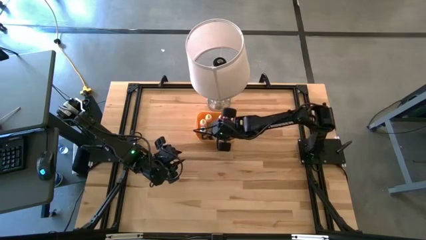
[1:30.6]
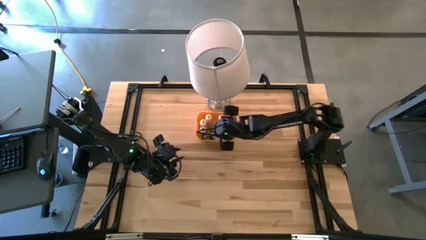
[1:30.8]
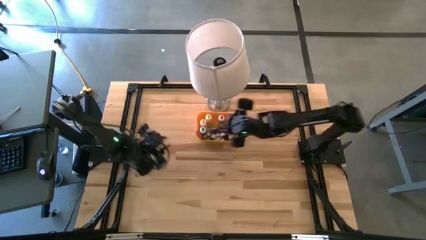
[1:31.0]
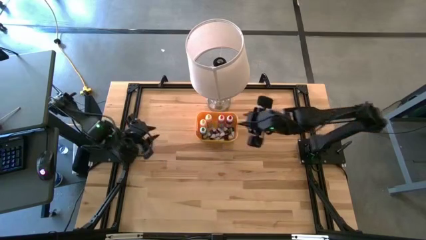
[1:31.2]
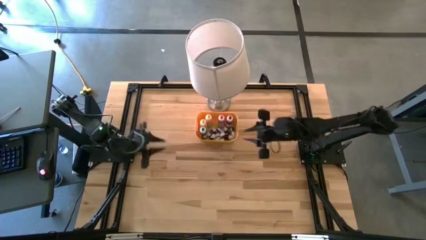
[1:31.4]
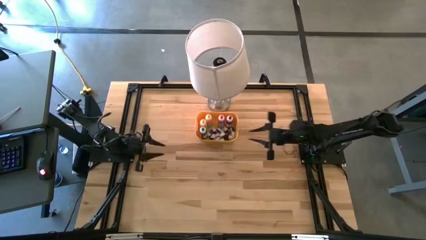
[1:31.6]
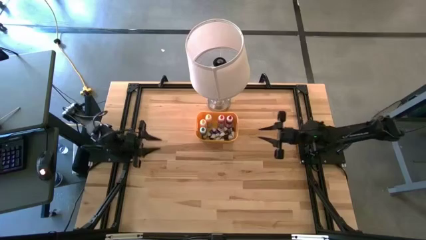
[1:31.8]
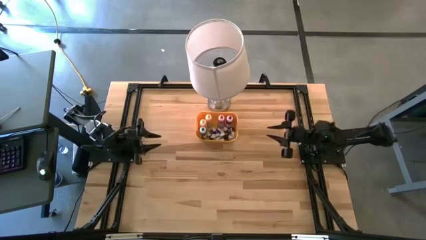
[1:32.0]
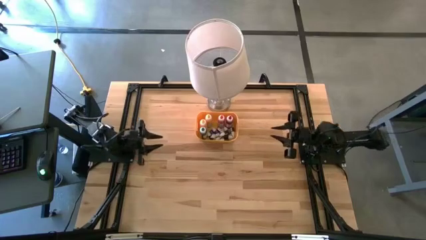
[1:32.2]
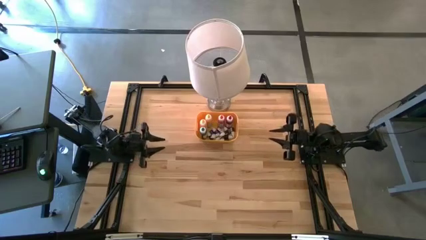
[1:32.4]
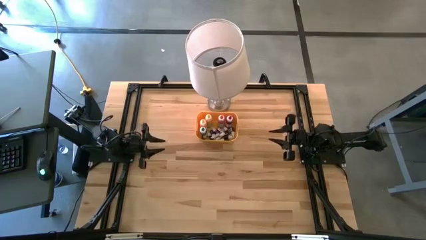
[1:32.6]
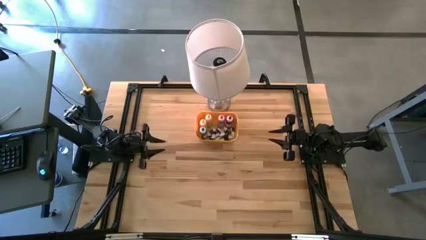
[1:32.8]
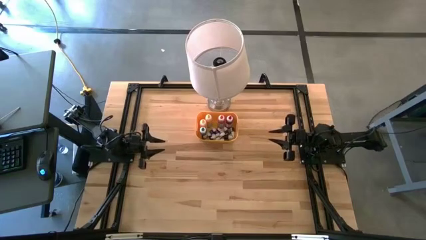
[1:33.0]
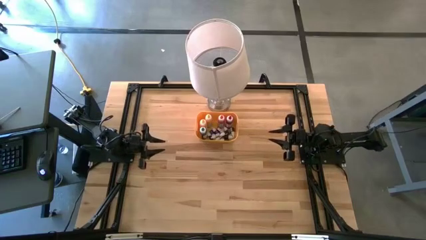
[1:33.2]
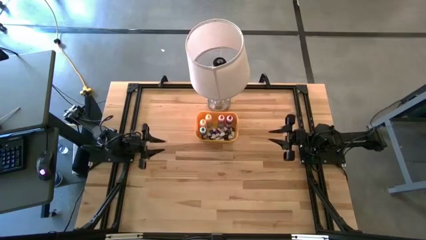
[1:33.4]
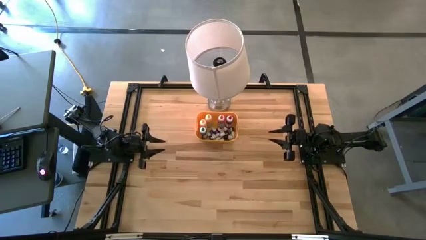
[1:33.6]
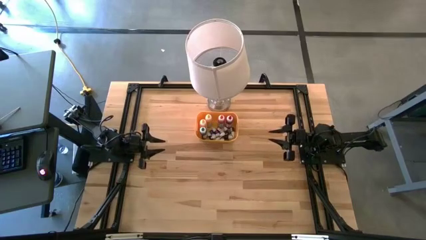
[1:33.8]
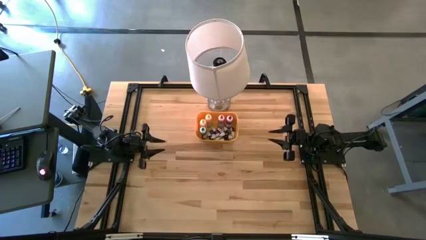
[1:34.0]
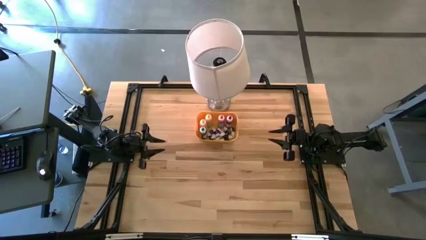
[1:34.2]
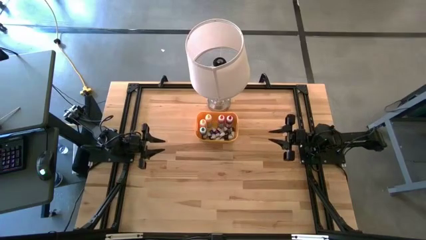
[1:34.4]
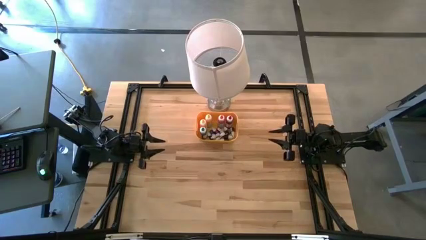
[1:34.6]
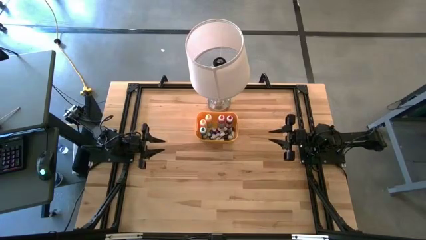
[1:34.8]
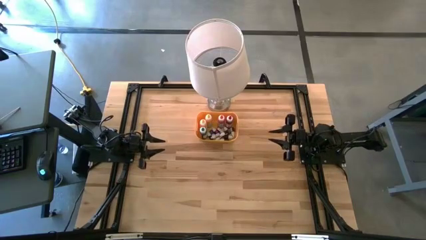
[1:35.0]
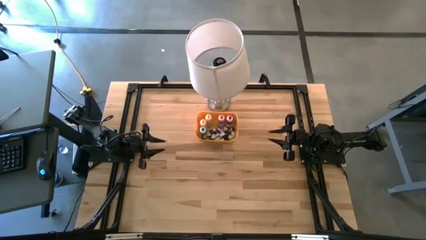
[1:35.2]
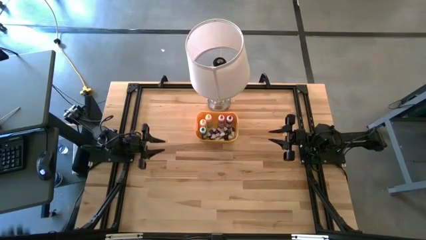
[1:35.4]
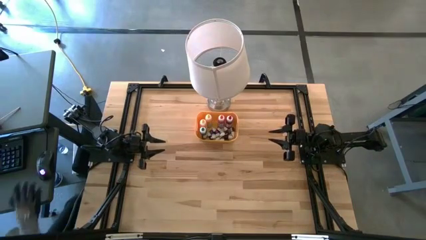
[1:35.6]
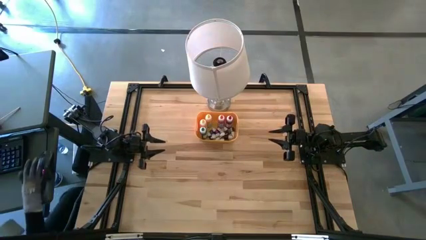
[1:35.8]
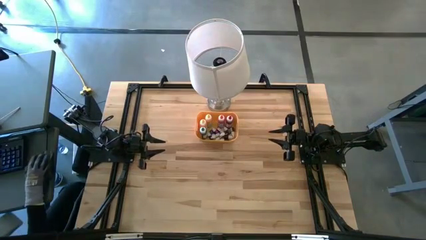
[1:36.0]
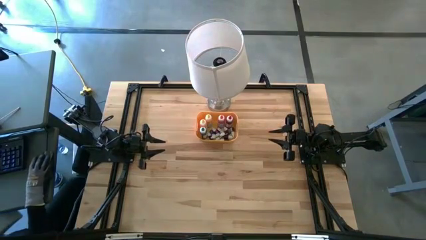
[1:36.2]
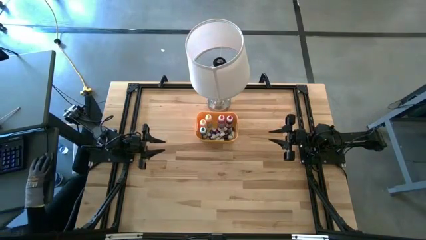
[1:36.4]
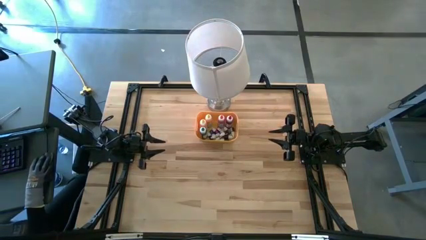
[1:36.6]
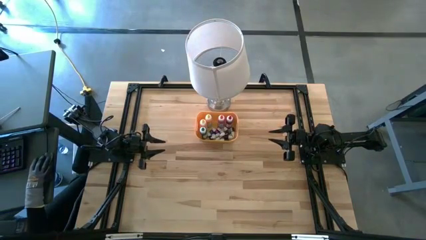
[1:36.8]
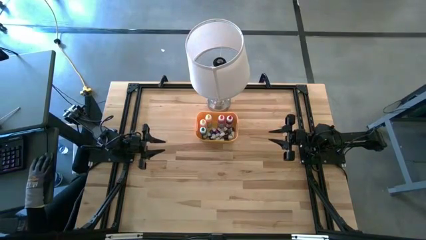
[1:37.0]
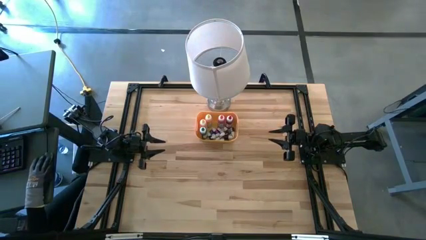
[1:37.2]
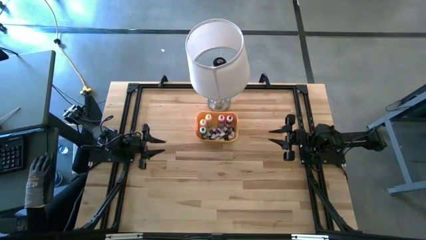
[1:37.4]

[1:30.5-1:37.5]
Task: Pick & Place food coloring
Return to Home Position

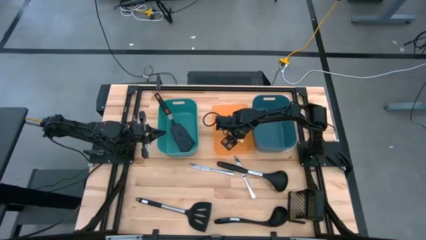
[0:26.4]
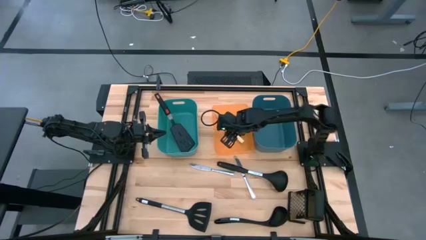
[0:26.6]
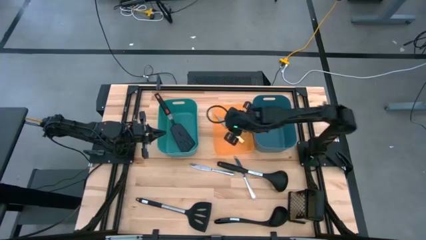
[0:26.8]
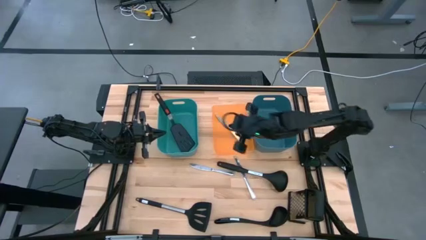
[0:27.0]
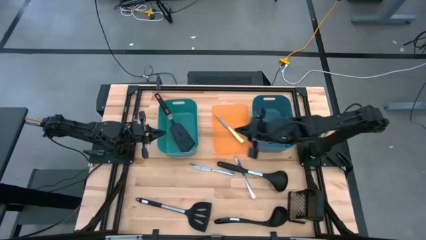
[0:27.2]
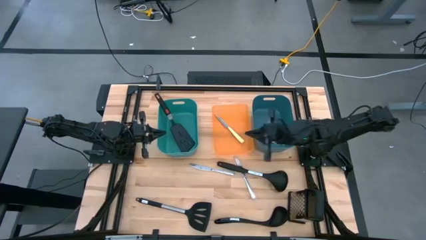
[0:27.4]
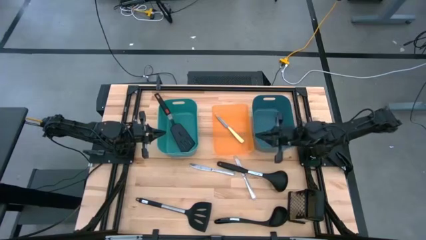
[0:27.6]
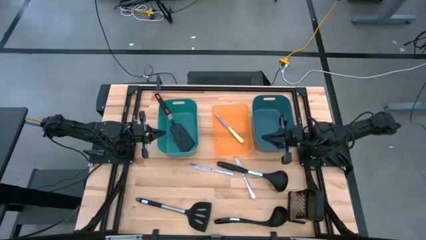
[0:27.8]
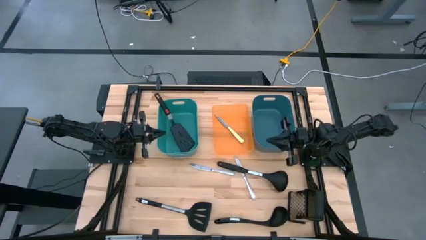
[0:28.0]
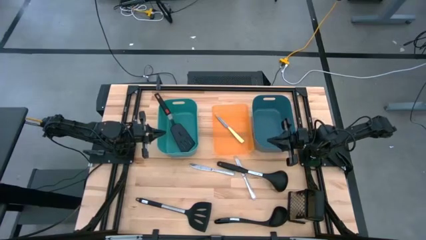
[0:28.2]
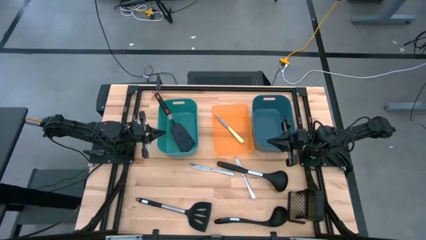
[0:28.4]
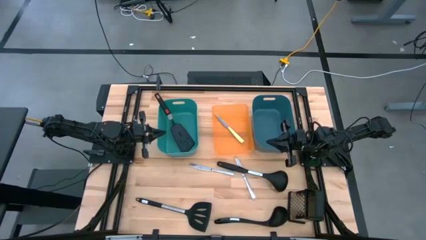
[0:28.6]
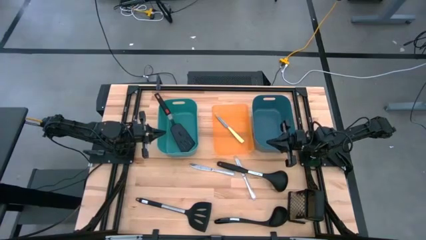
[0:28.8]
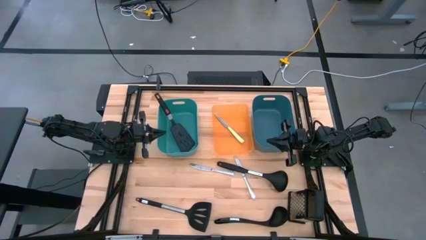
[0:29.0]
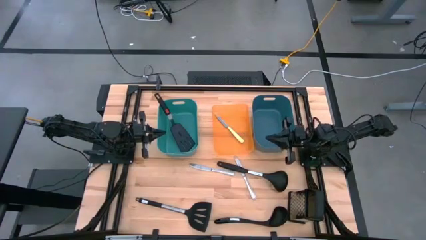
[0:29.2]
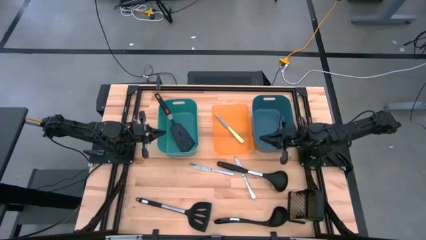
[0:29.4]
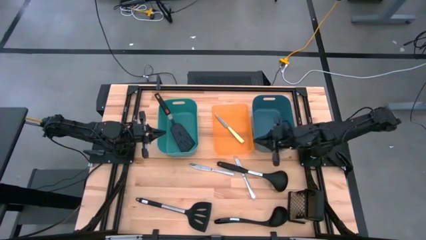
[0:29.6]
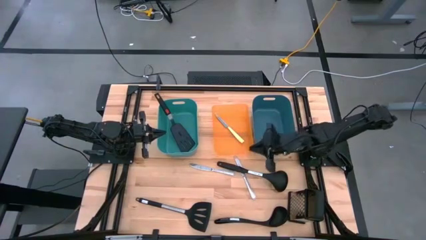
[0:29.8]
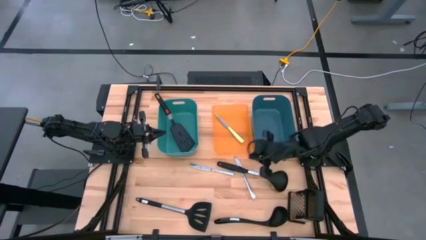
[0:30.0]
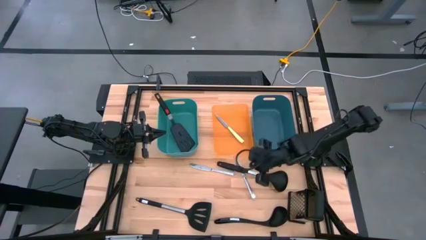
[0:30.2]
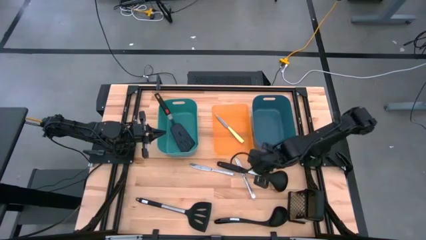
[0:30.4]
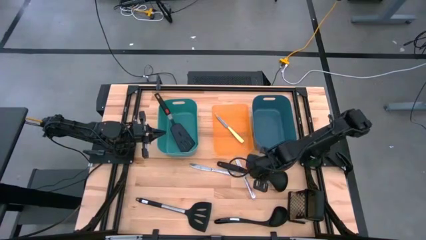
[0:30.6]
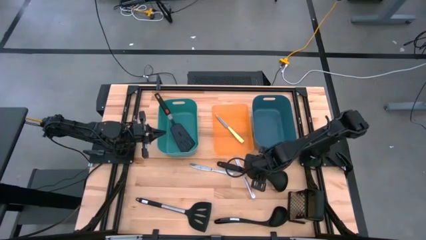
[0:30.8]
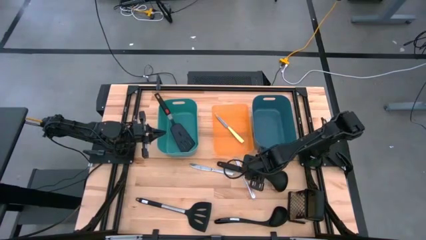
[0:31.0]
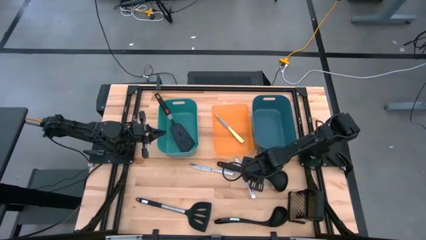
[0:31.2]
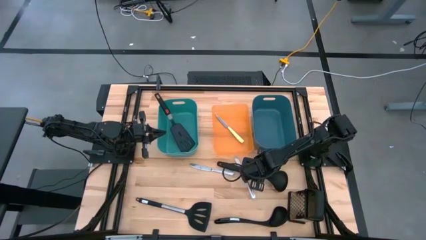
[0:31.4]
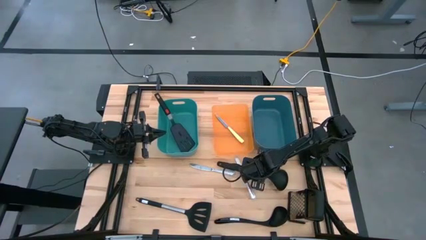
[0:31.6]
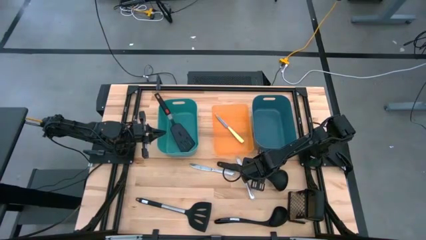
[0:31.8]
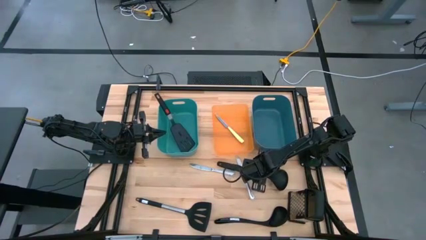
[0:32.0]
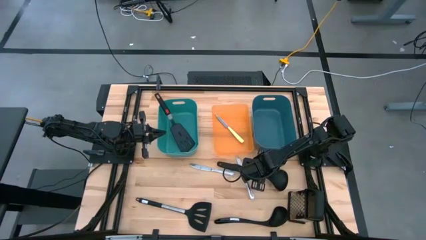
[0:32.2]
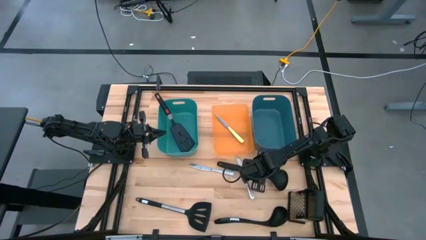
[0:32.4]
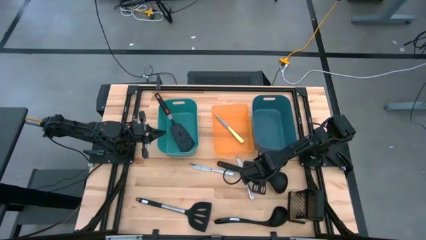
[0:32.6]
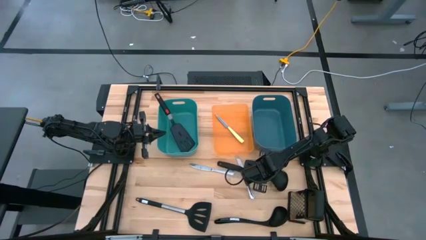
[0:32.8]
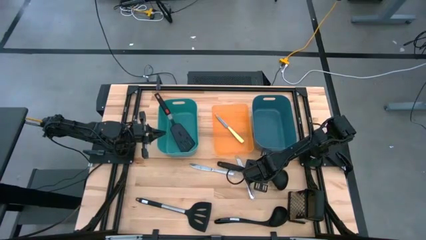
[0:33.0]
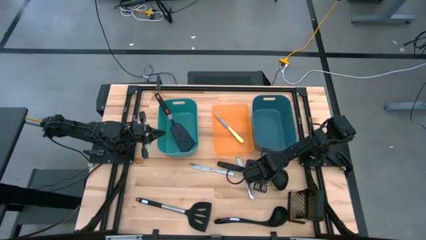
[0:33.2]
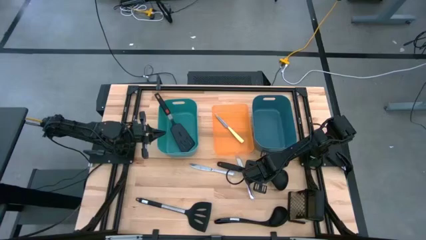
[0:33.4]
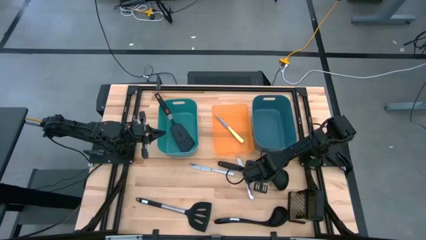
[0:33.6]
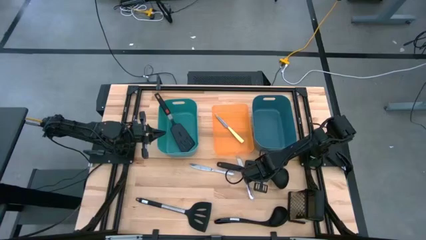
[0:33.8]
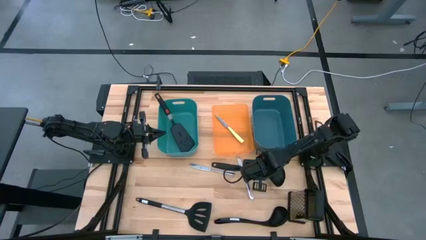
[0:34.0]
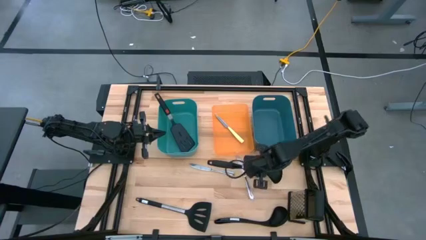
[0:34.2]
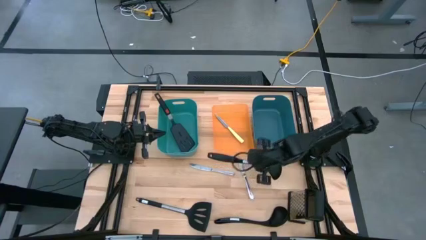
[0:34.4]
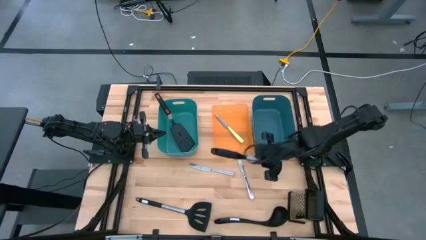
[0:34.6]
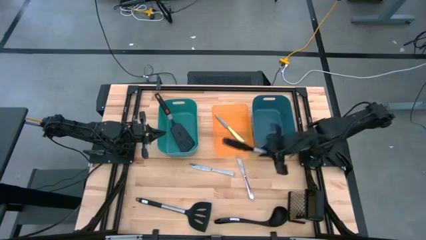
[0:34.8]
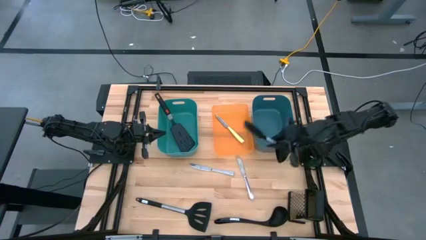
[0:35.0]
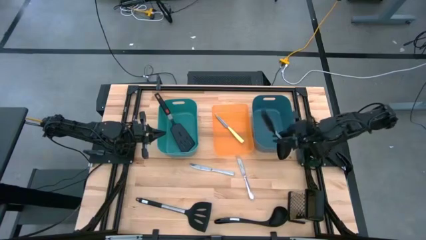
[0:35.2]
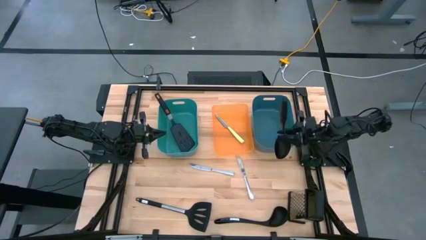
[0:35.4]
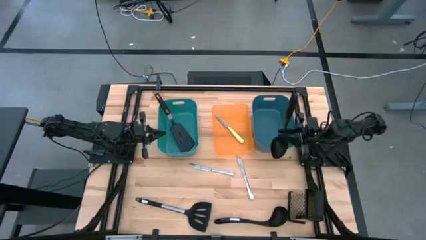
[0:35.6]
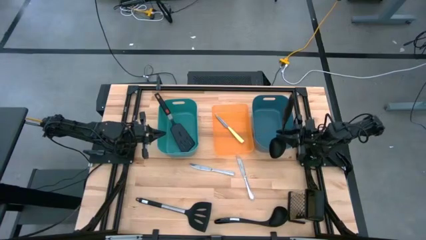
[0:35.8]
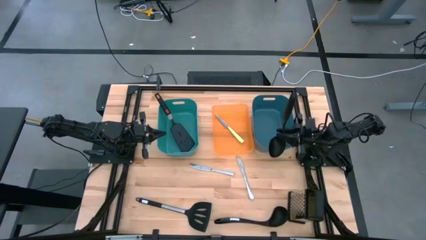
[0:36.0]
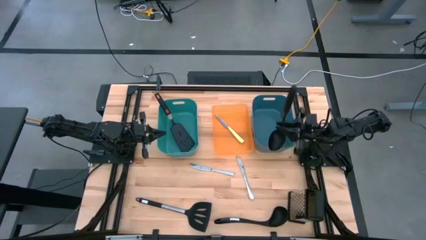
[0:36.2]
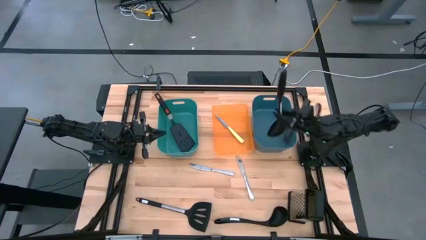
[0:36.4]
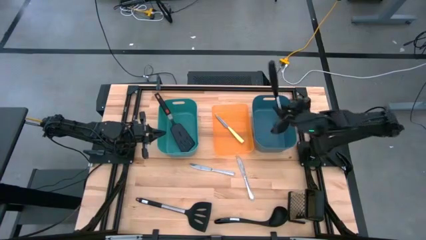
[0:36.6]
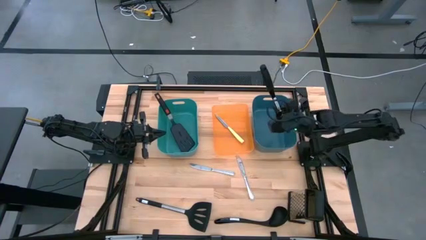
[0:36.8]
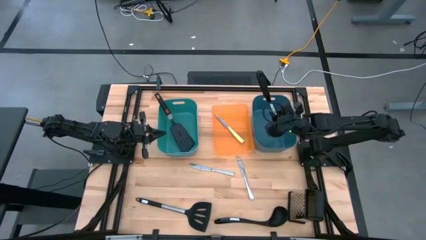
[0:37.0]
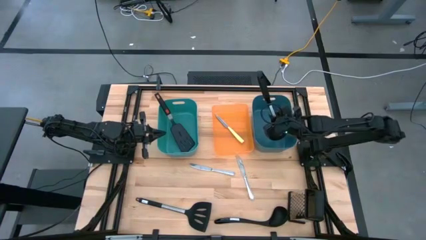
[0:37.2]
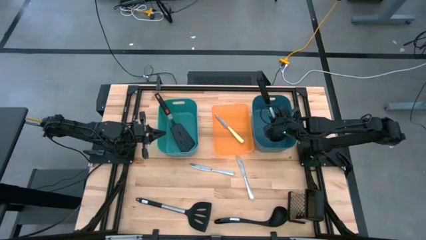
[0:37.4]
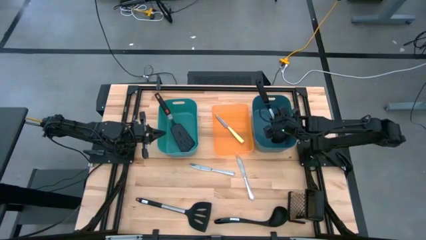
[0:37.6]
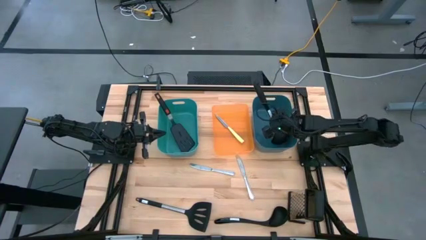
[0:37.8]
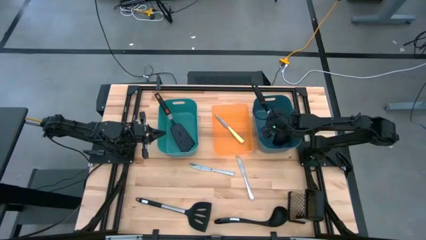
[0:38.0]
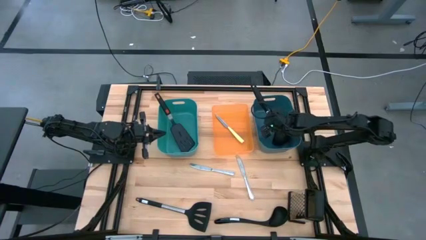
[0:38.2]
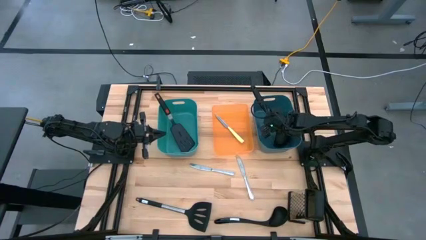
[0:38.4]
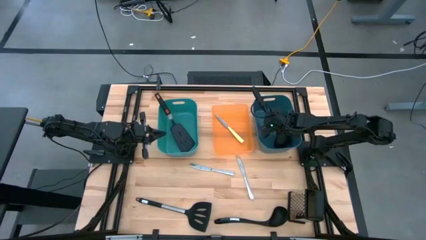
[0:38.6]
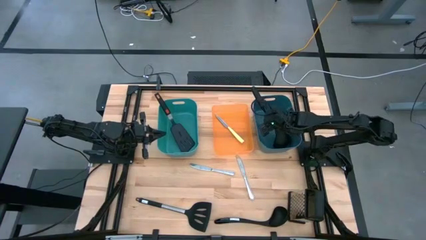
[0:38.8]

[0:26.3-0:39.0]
Task: Pick & Place Kitchen Items
Put the top black serving spoon into the blue bin
